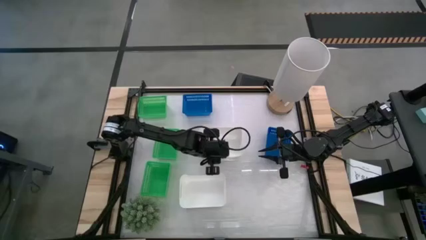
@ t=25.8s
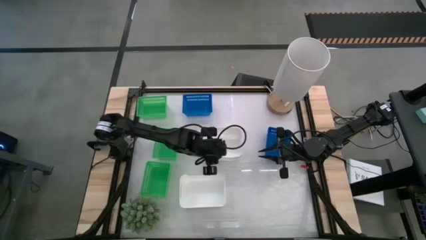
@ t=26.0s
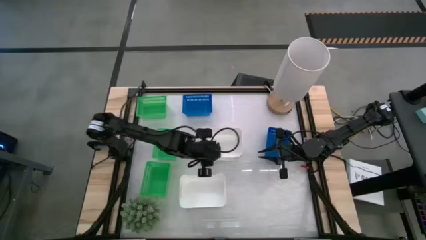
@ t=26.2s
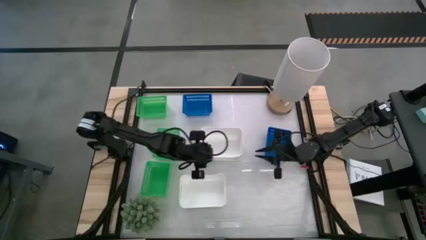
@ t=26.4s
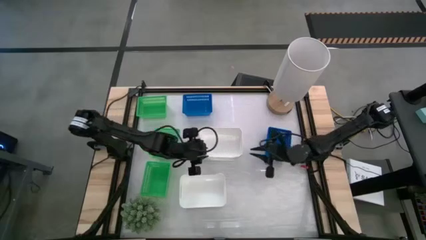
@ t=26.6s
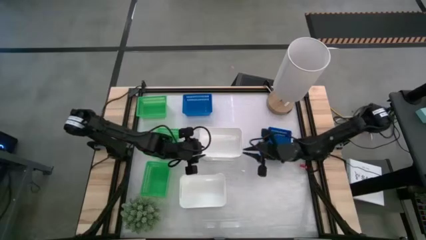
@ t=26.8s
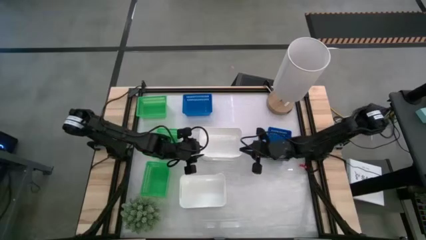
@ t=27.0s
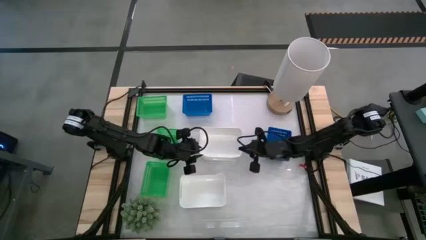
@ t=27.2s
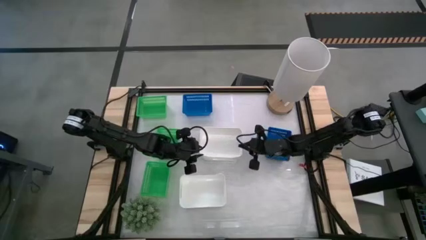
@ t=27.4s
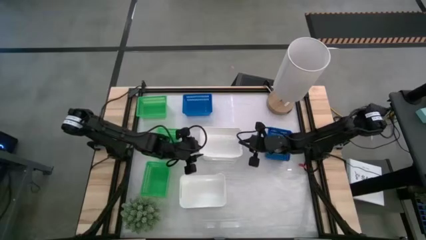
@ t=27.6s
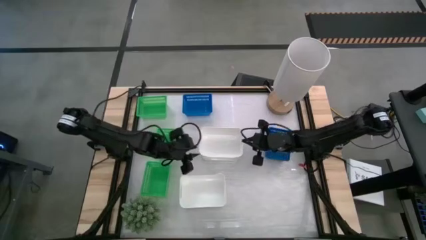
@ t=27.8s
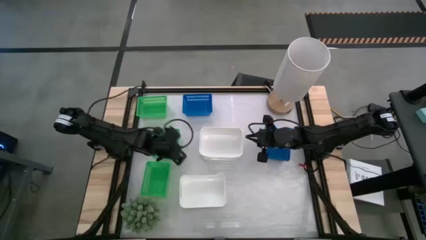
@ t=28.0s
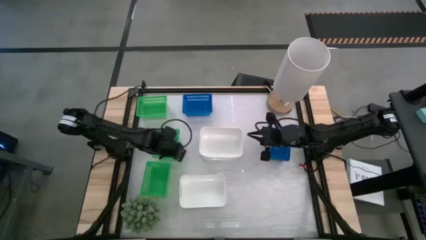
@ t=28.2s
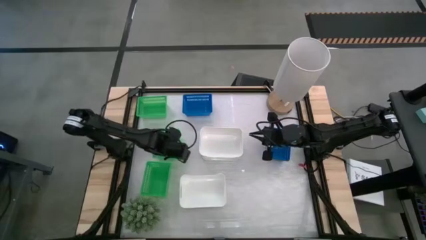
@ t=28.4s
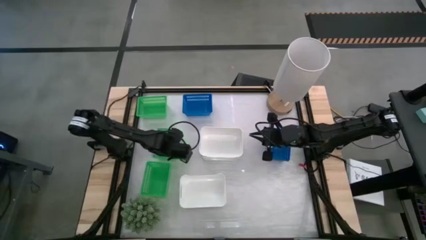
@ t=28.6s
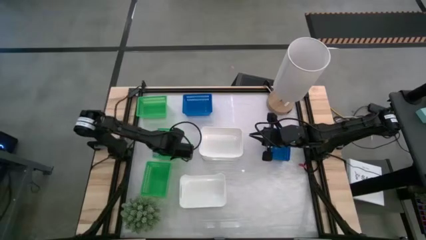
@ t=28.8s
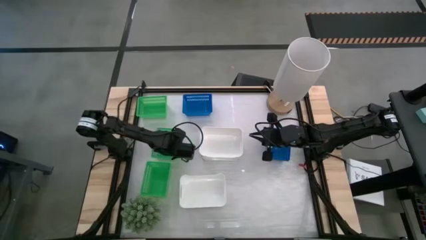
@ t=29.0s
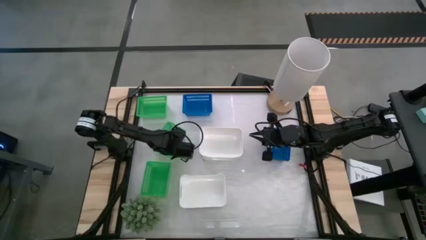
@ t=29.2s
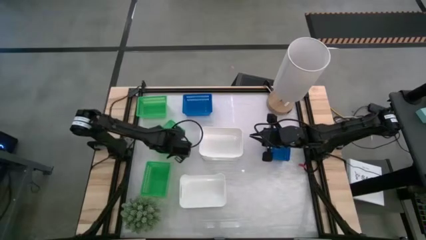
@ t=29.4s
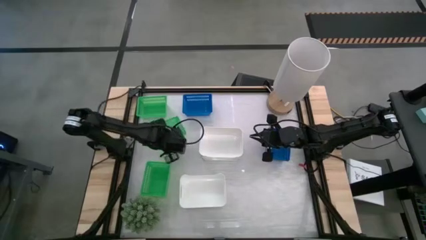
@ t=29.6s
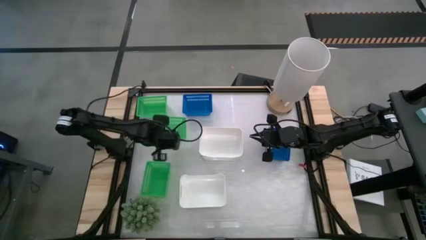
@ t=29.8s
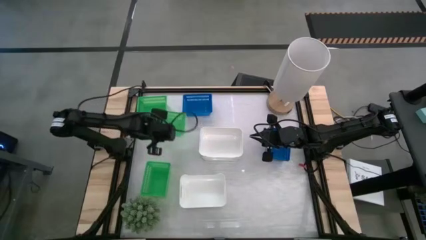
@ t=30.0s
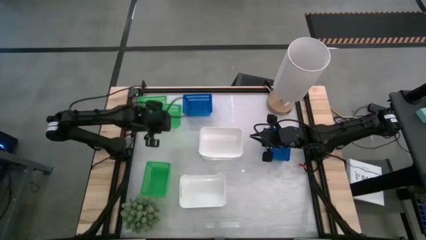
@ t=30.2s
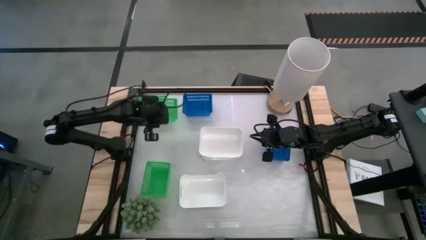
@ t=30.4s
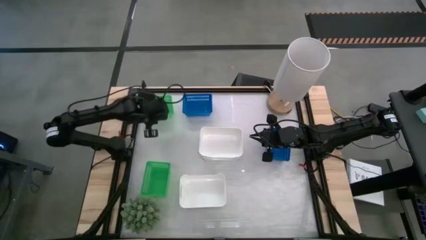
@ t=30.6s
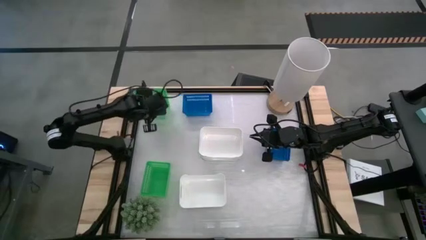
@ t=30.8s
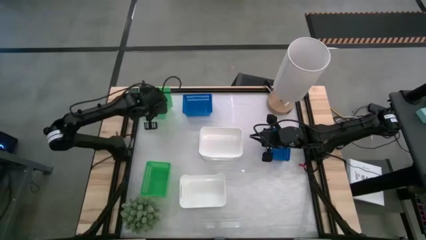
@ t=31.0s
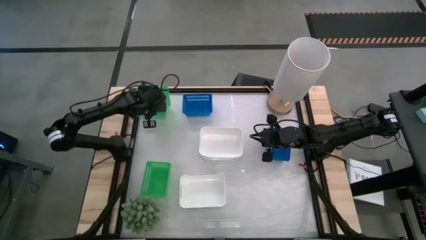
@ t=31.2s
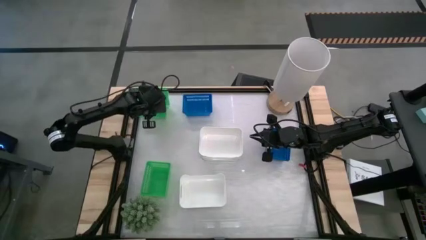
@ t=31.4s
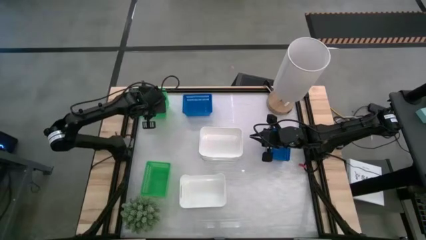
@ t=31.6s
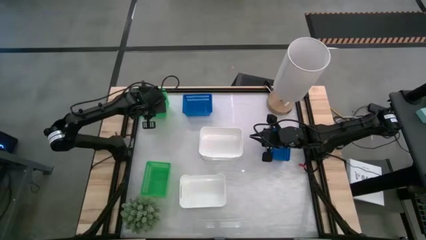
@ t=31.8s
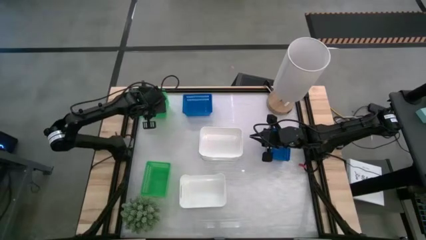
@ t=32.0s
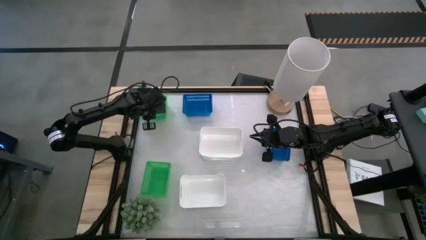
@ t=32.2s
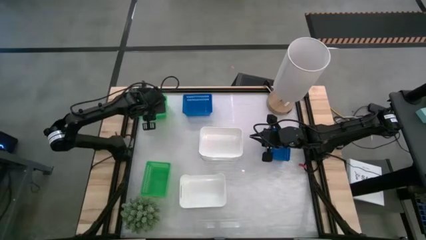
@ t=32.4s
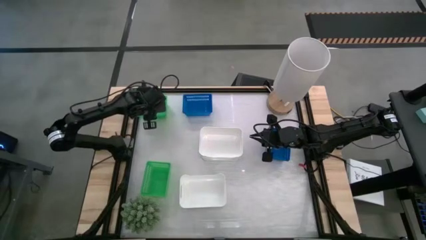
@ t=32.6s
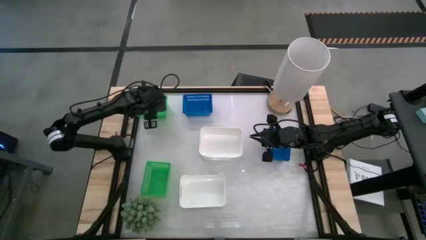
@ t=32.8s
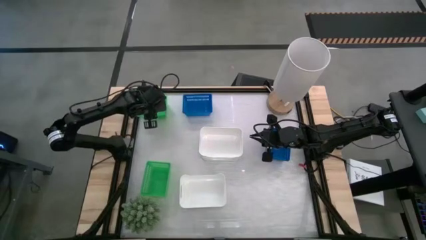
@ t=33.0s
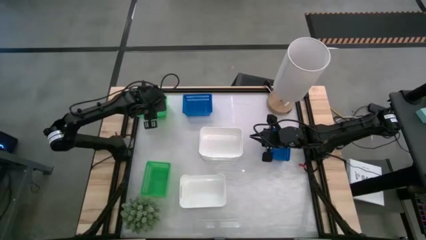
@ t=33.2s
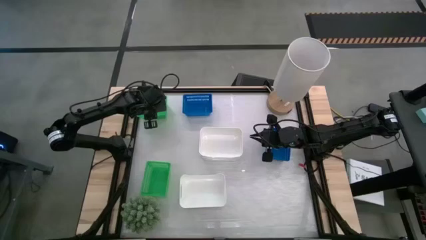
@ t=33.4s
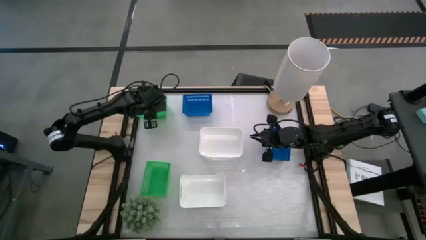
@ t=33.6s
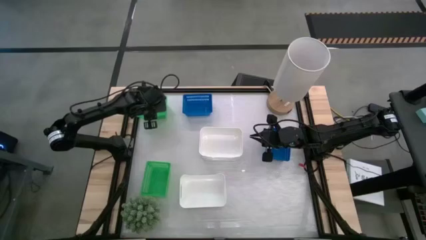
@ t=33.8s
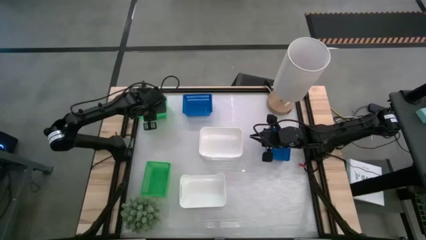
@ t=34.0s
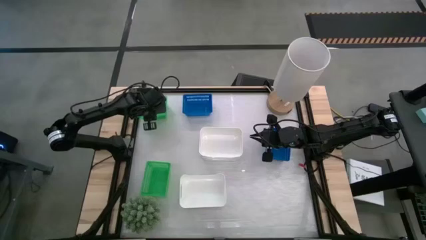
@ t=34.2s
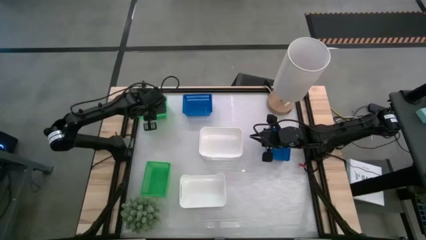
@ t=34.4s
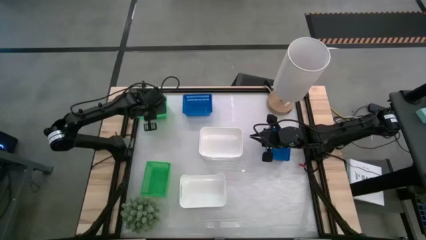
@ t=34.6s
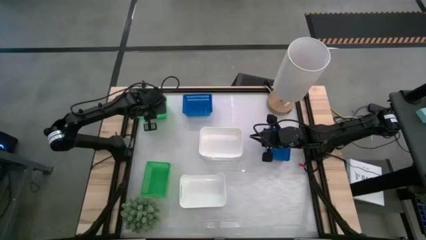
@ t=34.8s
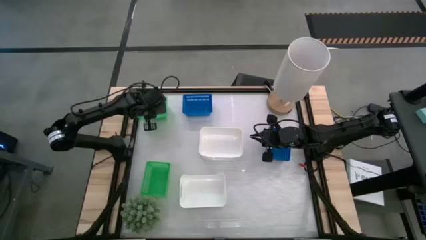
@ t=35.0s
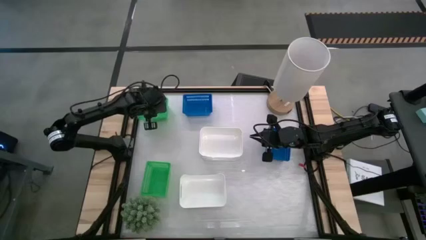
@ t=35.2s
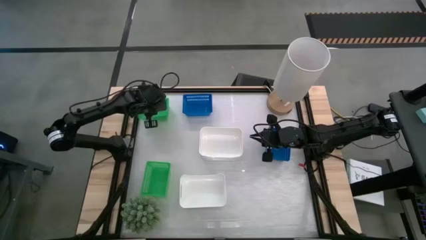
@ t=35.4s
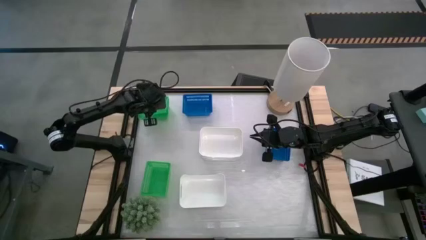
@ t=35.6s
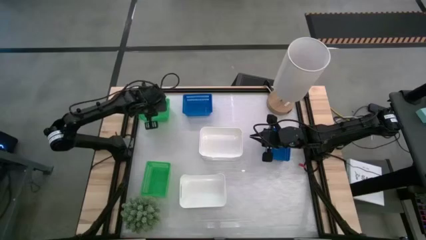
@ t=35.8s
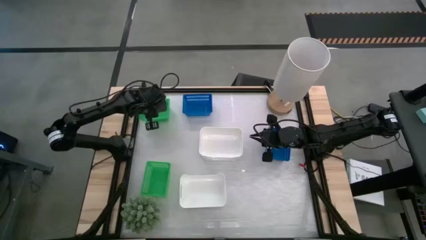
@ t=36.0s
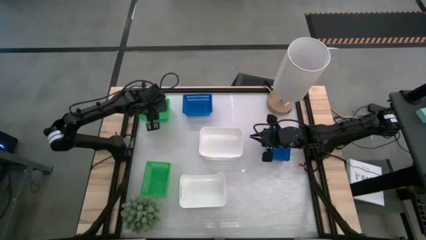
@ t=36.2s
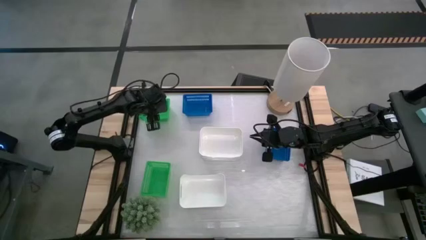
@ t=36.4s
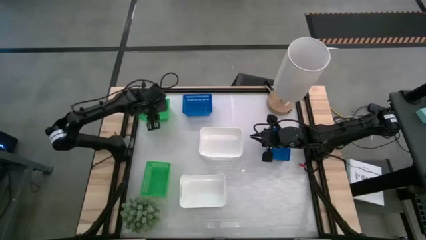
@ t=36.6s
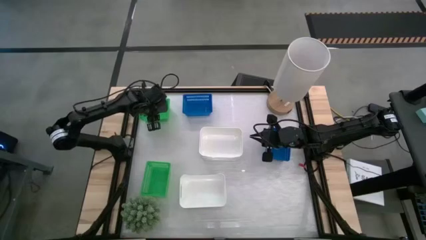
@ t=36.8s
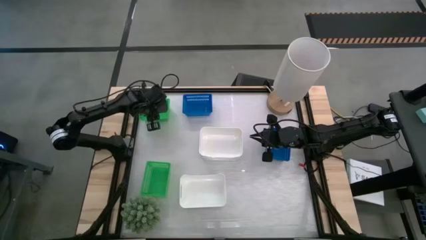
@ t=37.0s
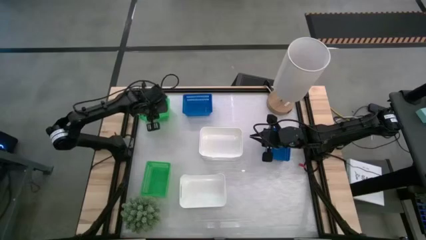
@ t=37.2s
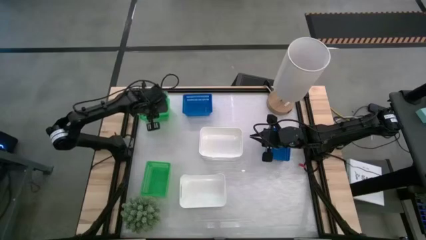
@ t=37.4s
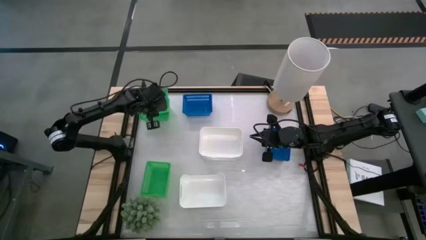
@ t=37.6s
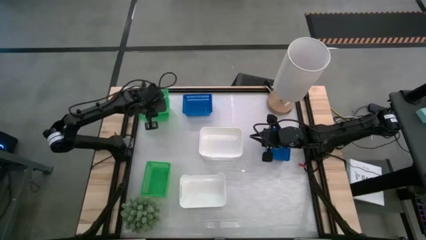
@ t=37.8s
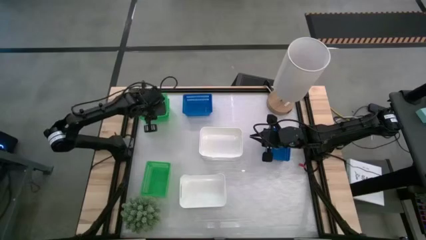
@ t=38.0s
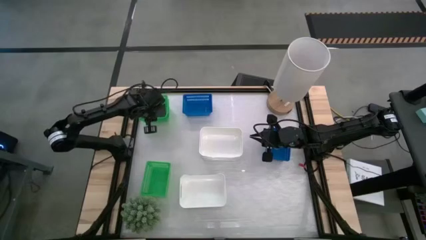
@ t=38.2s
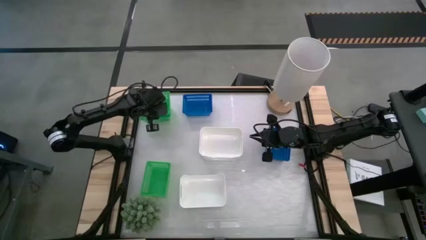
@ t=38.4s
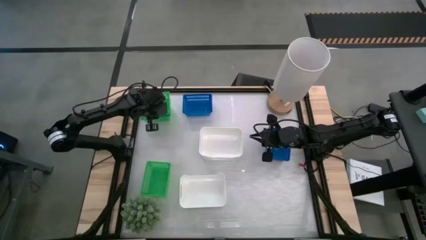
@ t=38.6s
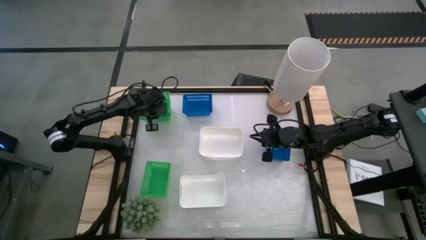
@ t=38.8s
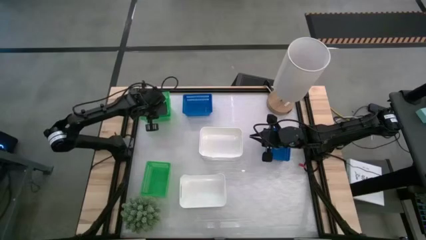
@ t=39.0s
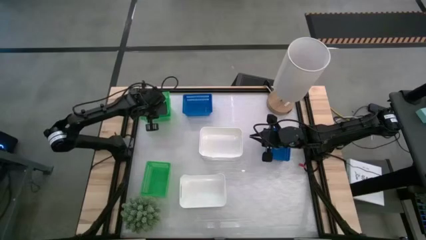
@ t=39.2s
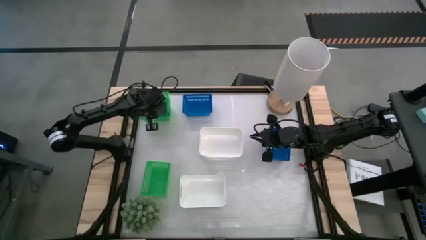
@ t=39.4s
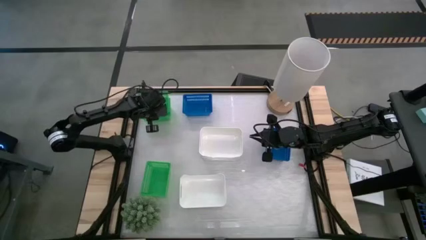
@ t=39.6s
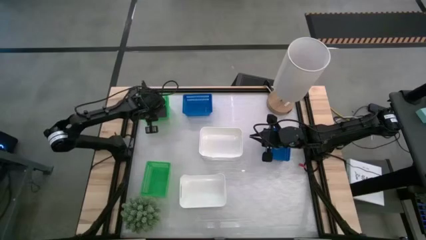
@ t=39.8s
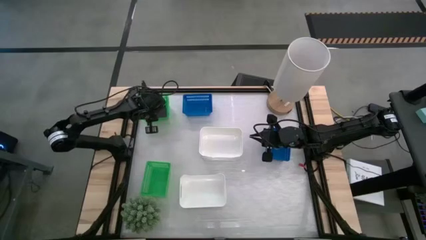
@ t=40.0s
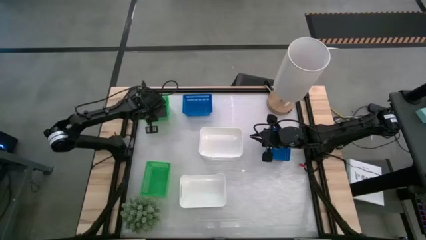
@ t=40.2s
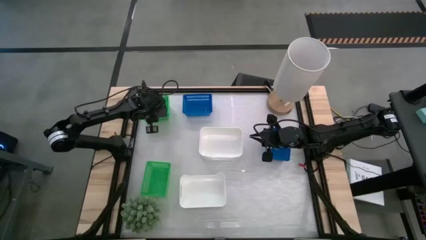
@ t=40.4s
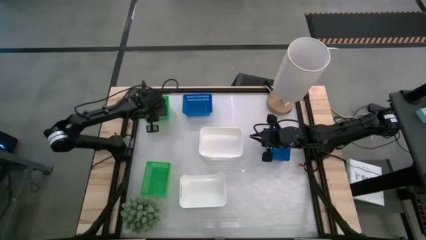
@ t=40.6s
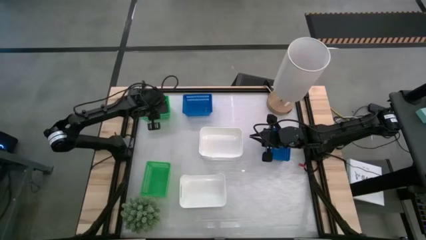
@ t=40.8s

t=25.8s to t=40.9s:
Stack the middle green bin on the top green bin
